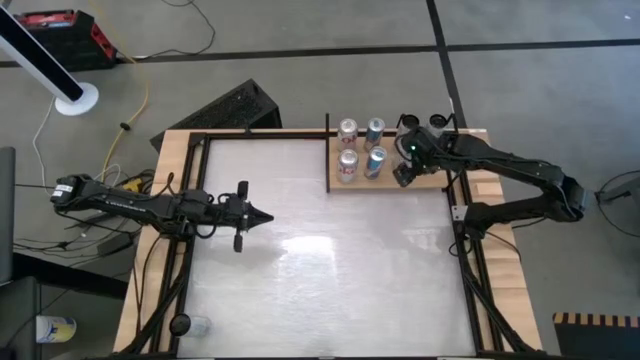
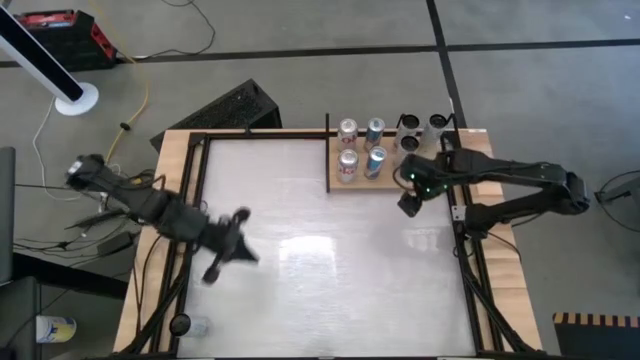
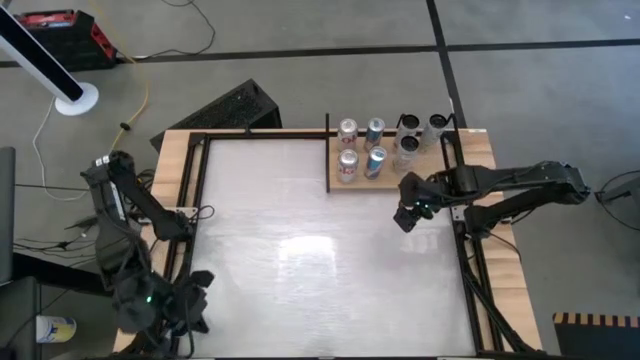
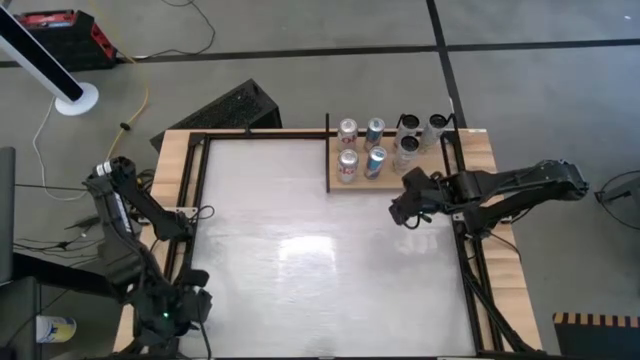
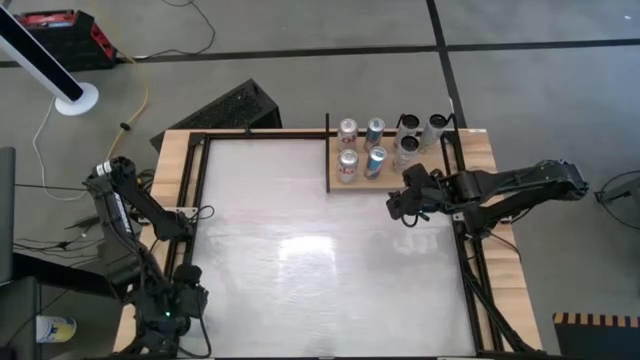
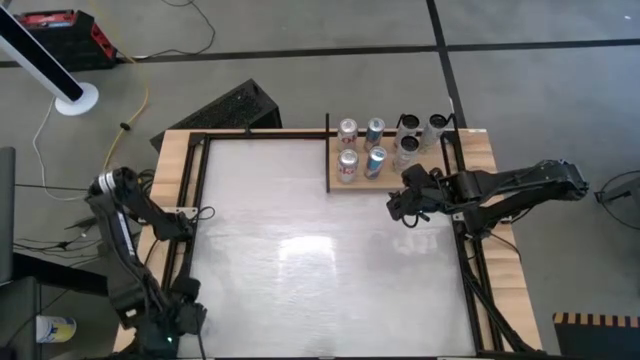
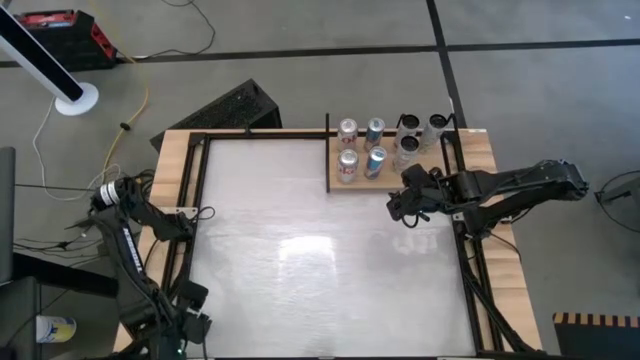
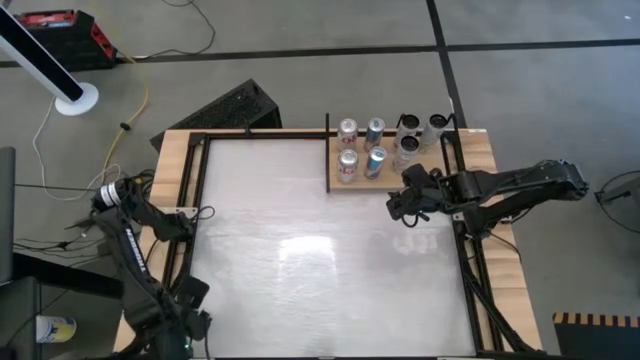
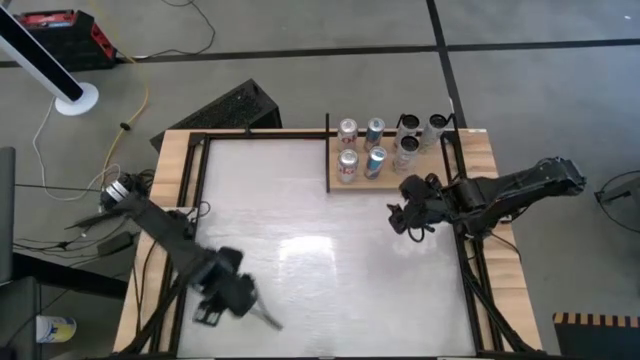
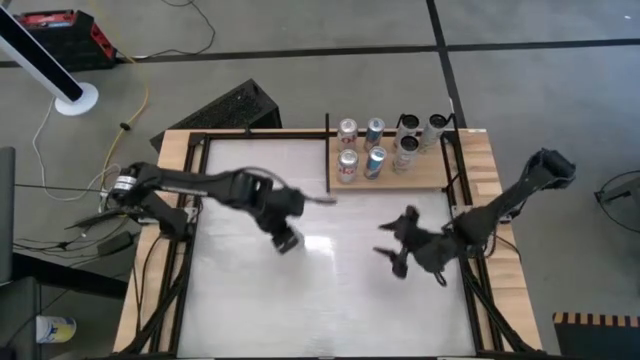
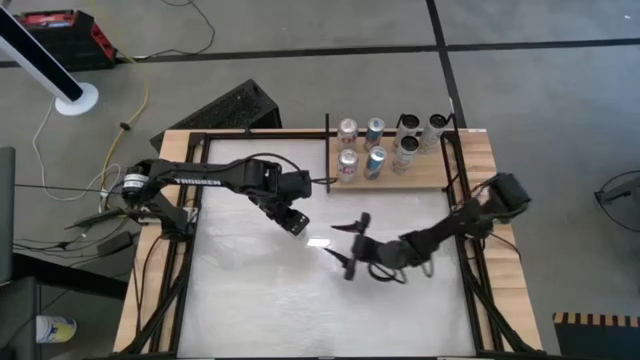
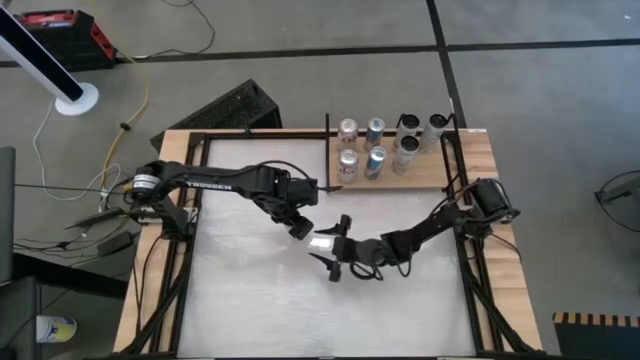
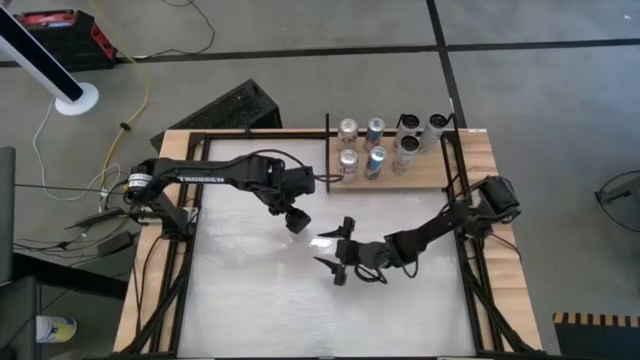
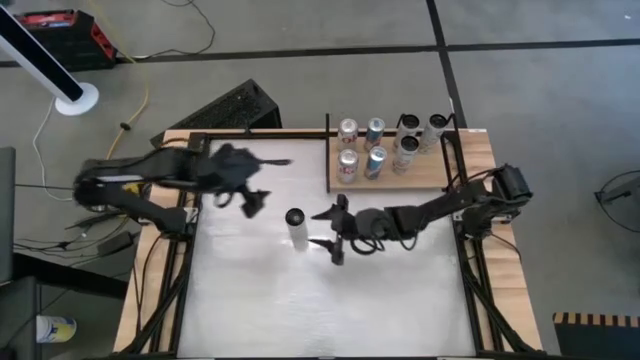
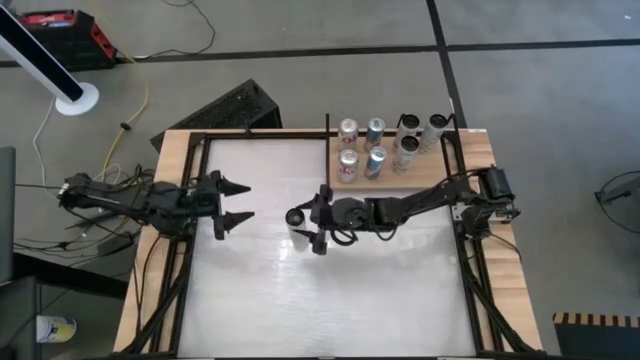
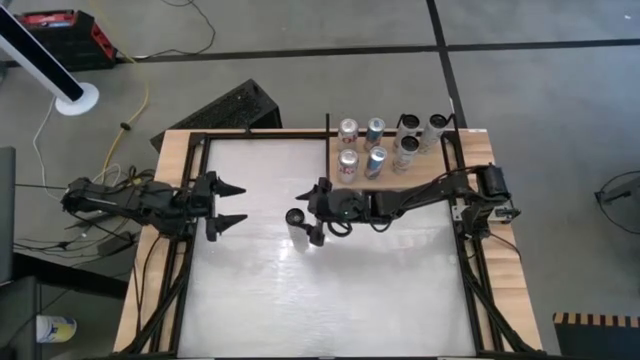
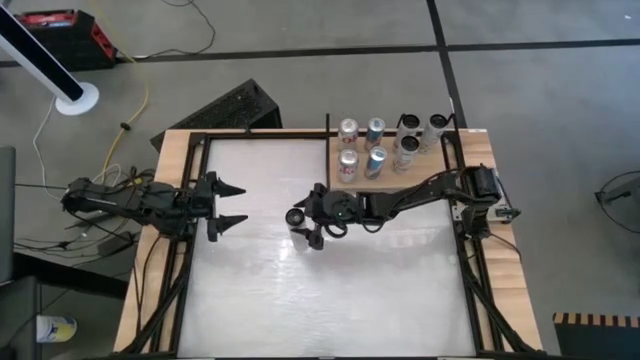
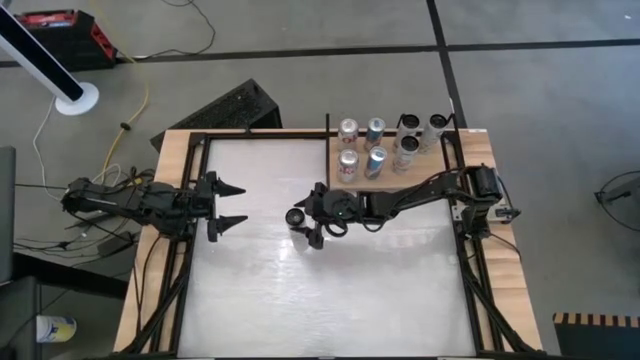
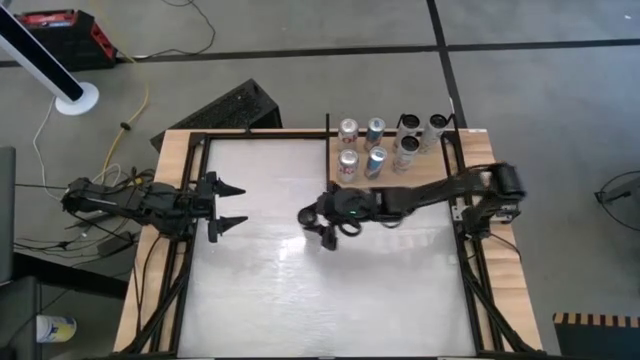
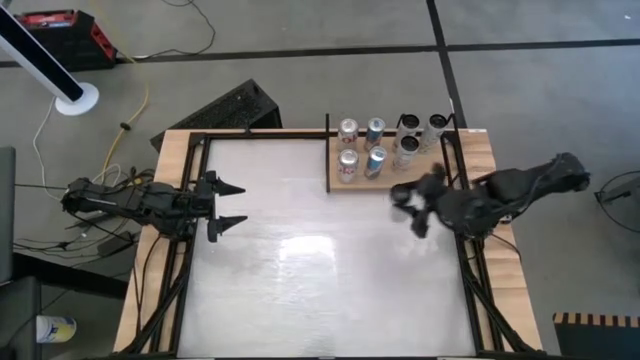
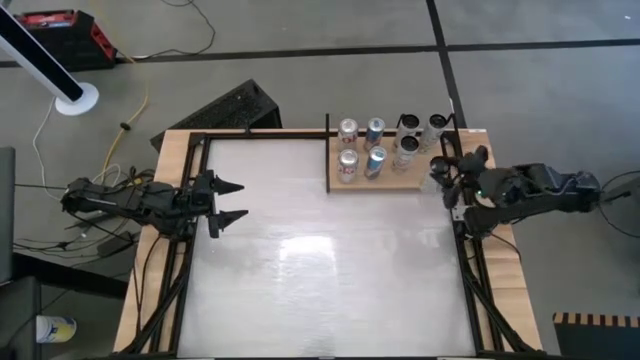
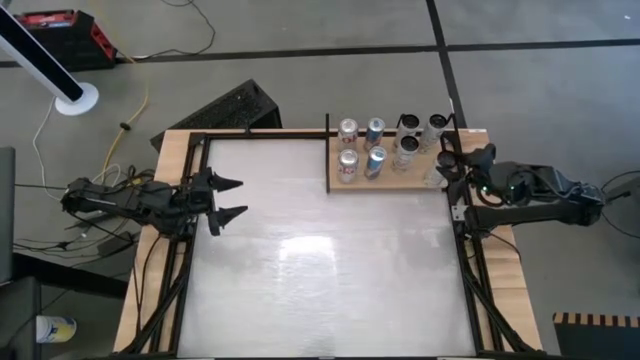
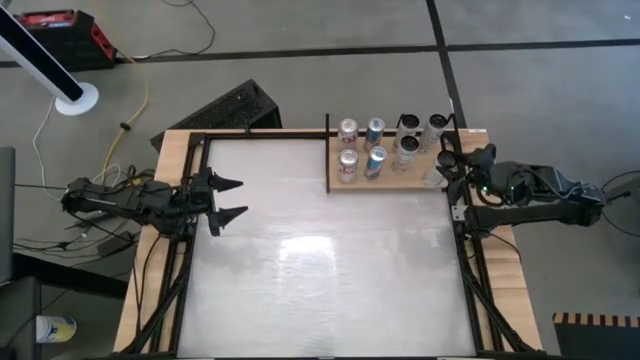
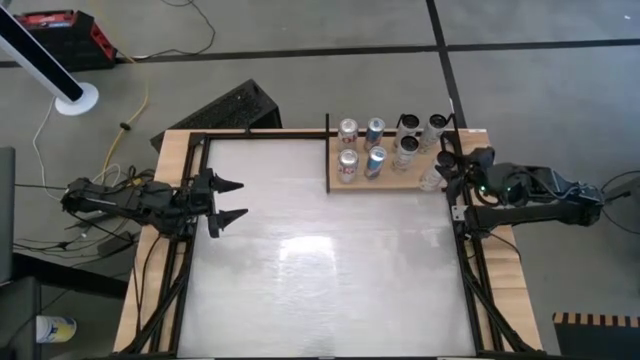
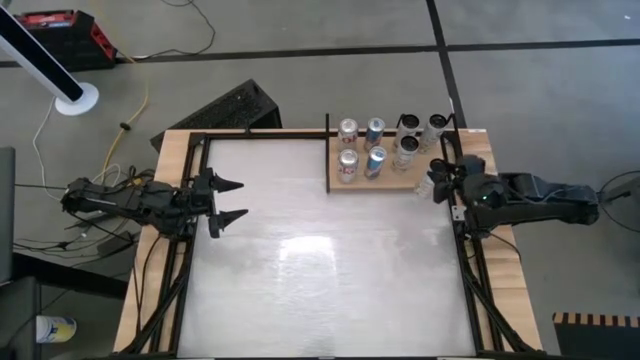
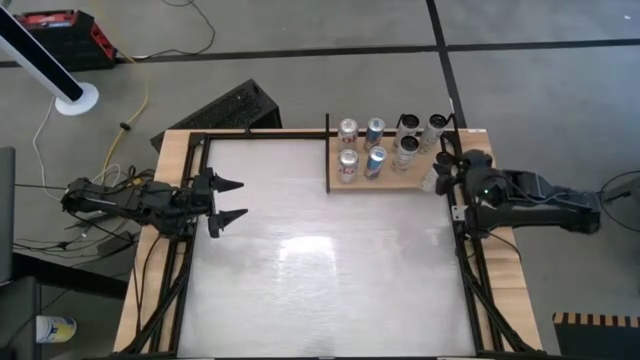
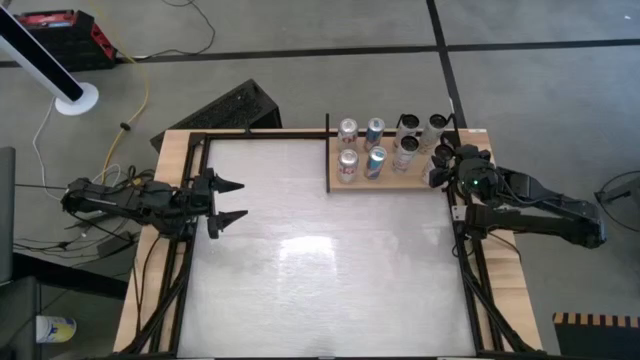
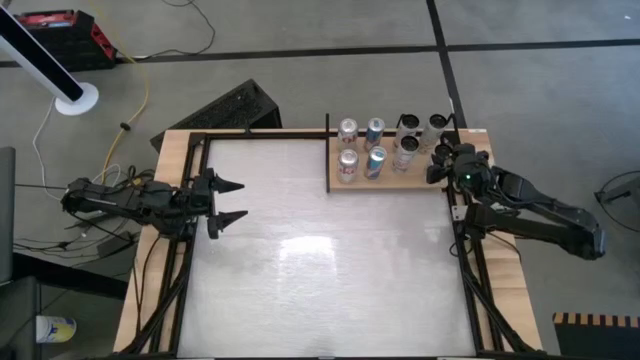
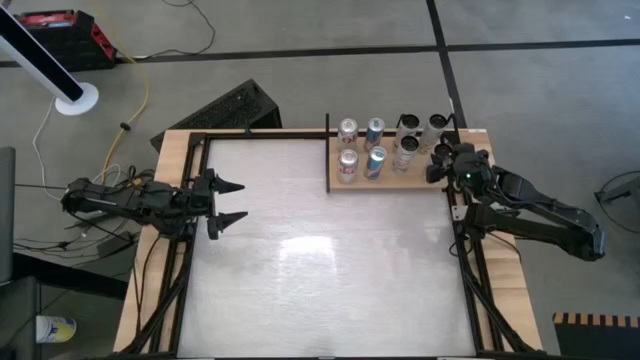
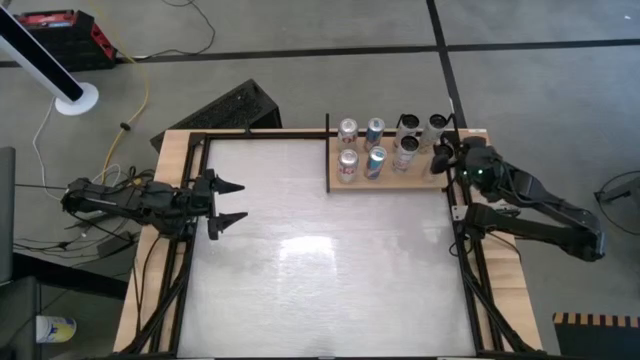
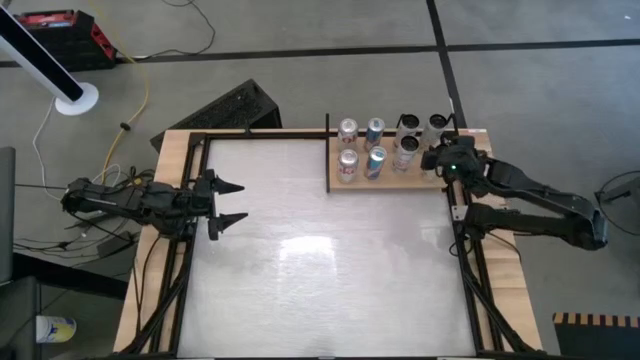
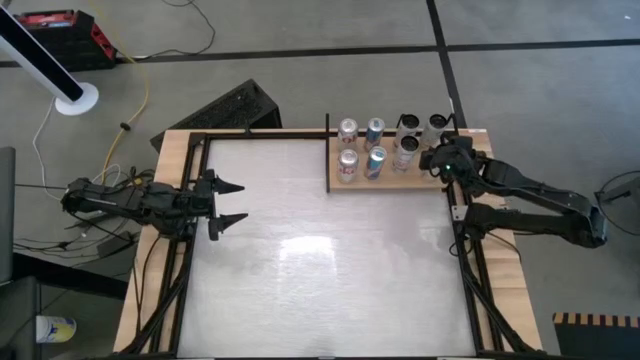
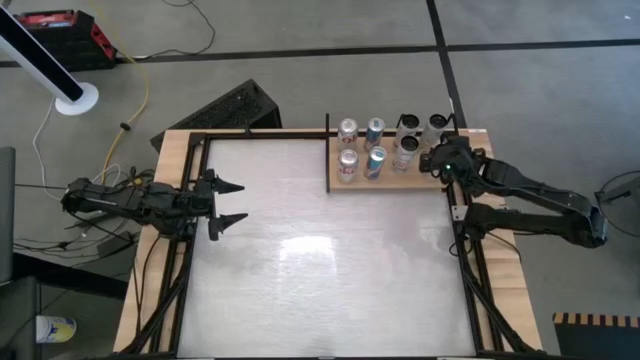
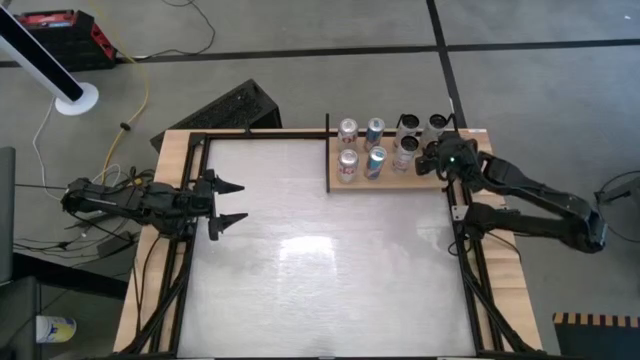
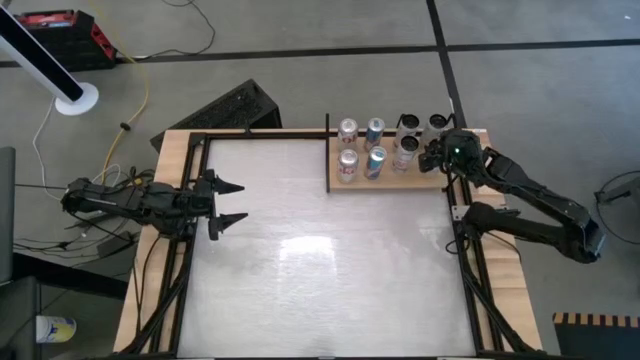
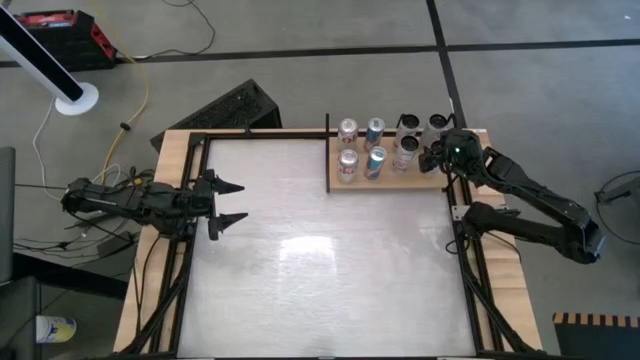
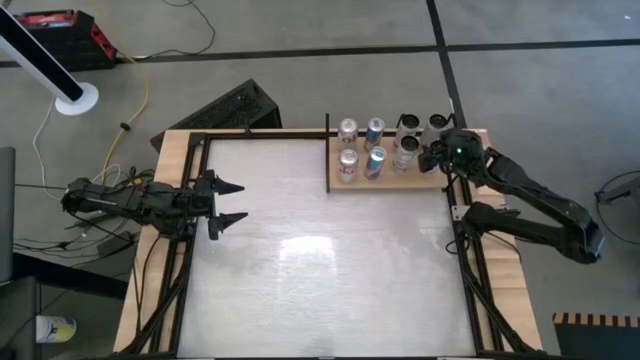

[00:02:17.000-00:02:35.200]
Task: Place canned beverage on shelf
Put the white soda can on the shelf aligned with the other white soda can

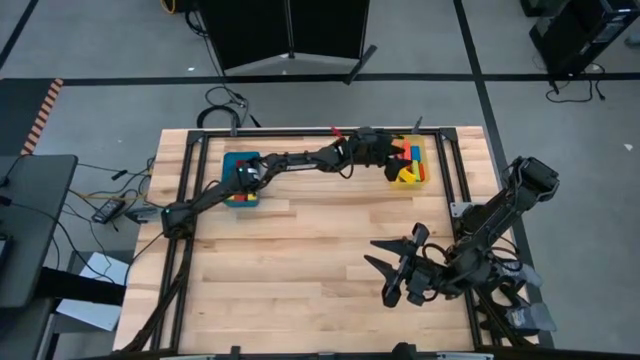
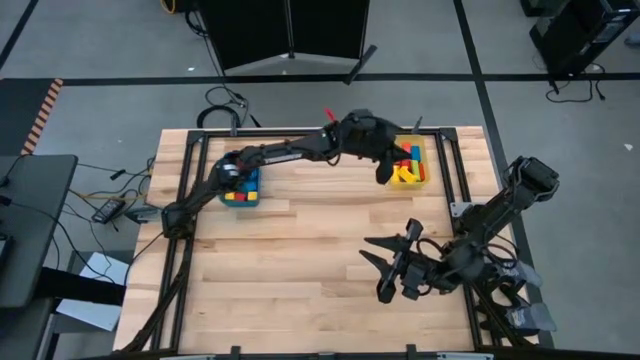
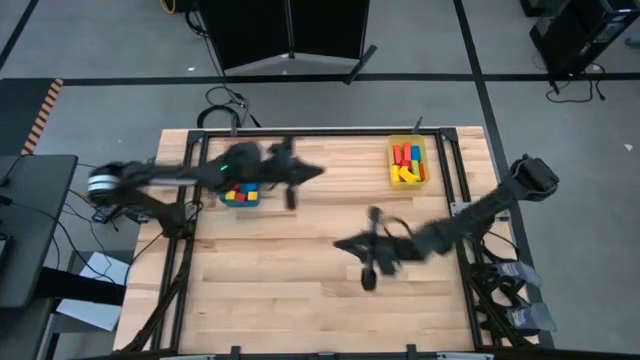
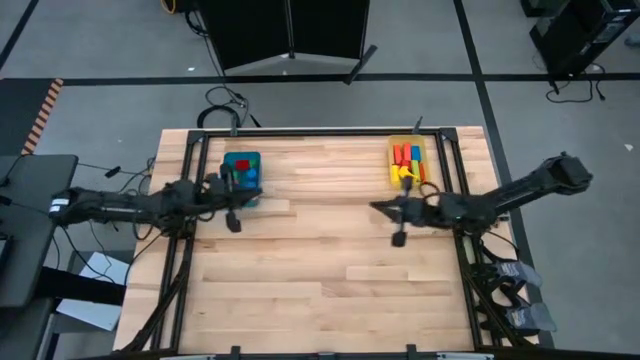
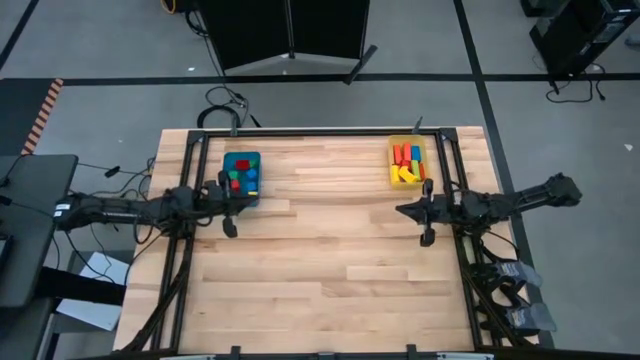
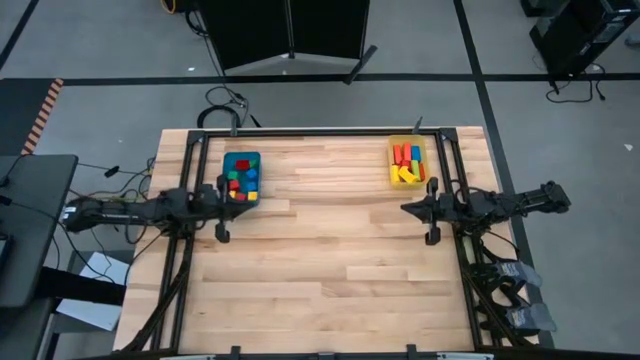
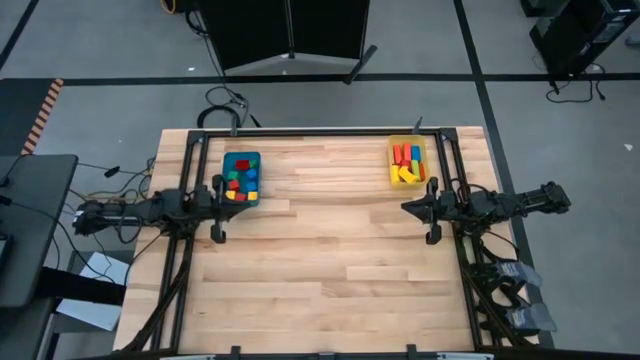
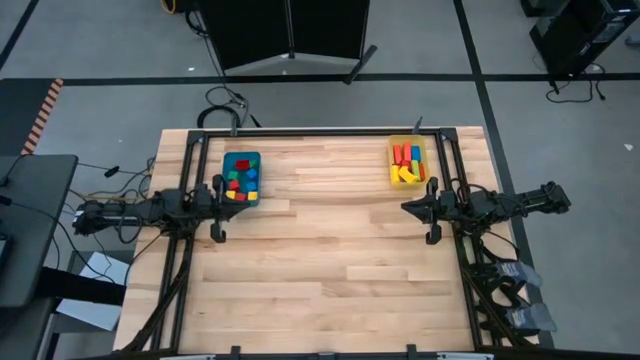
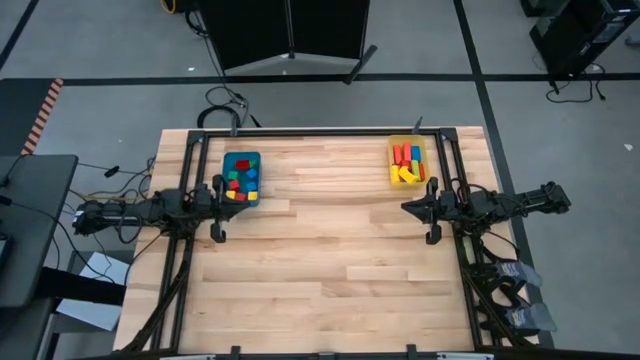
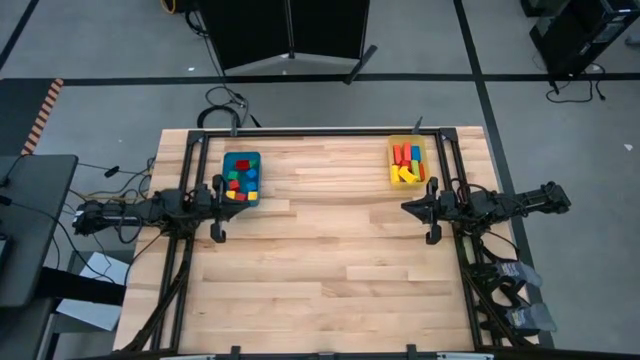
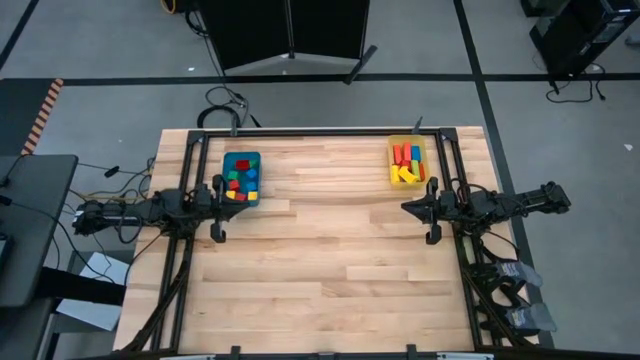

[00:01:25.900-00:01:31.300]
Task: Sort blocks by size
Return to Home Position
